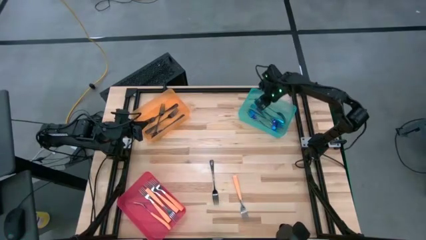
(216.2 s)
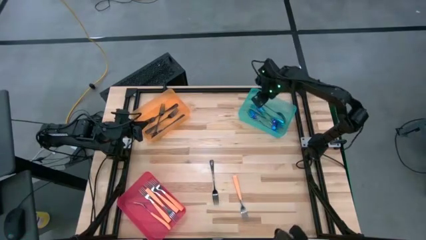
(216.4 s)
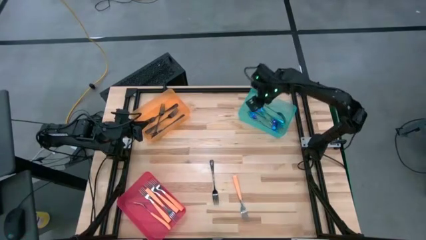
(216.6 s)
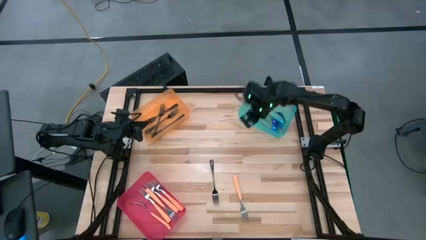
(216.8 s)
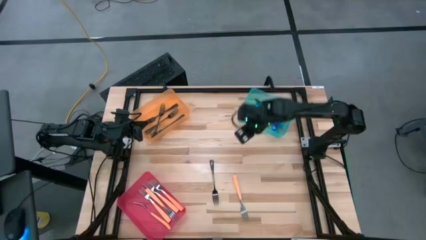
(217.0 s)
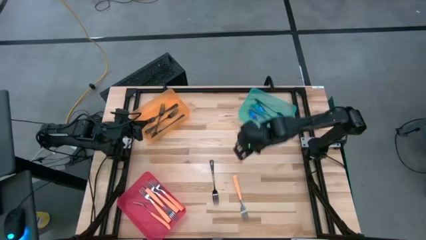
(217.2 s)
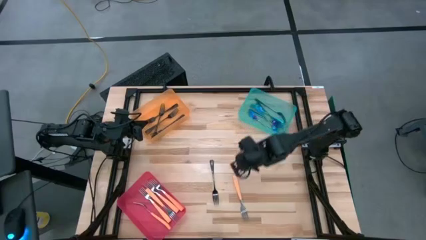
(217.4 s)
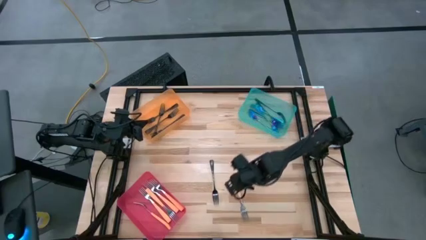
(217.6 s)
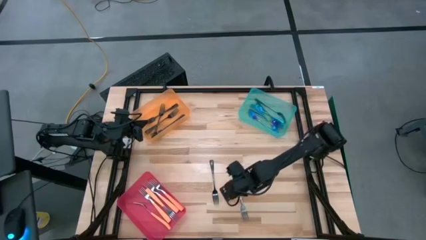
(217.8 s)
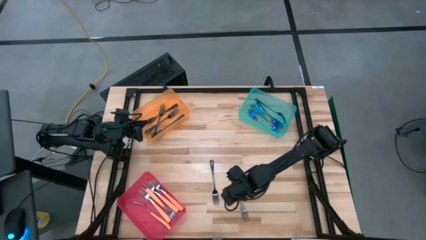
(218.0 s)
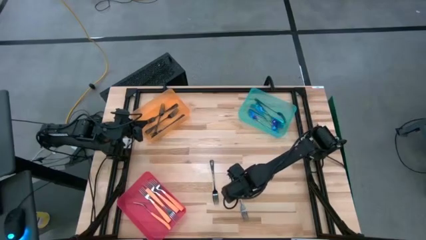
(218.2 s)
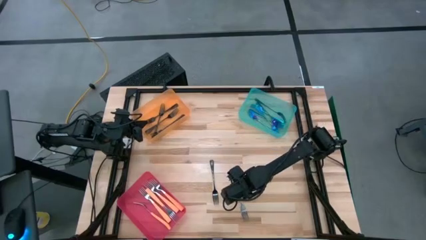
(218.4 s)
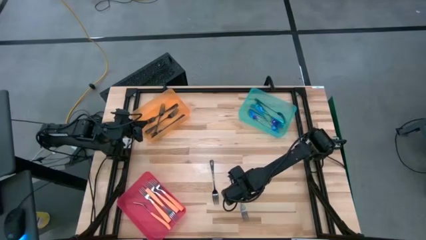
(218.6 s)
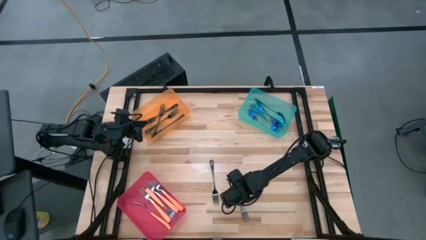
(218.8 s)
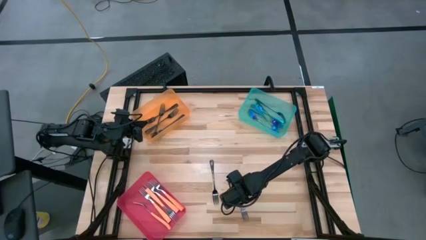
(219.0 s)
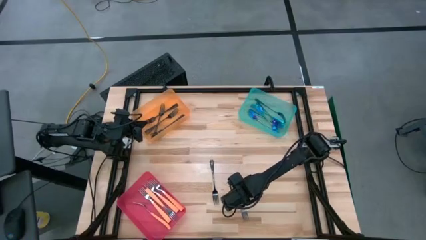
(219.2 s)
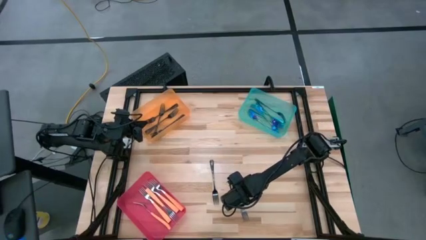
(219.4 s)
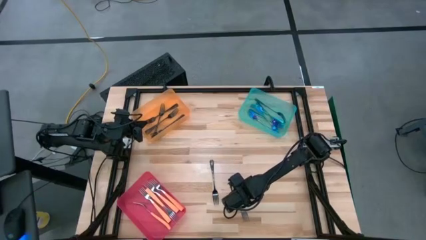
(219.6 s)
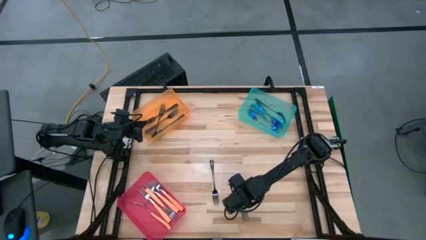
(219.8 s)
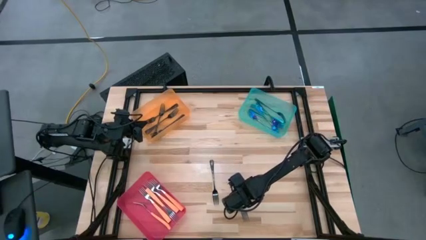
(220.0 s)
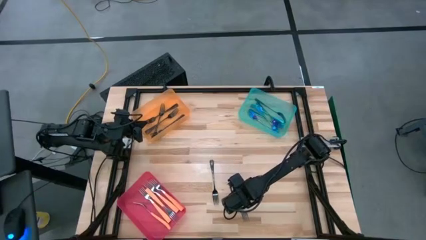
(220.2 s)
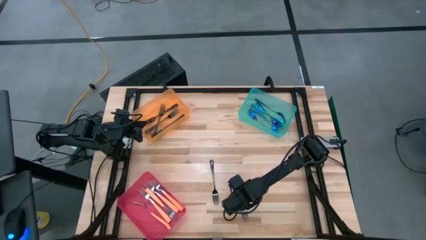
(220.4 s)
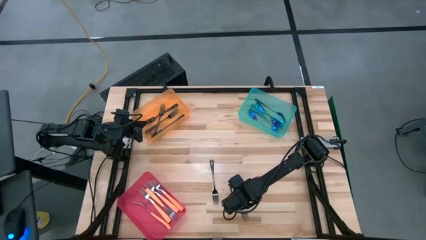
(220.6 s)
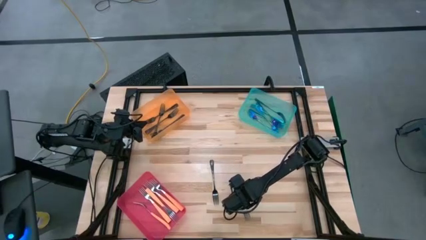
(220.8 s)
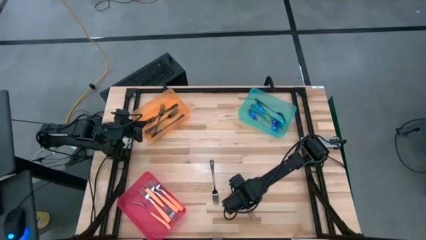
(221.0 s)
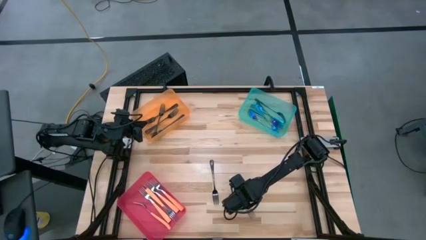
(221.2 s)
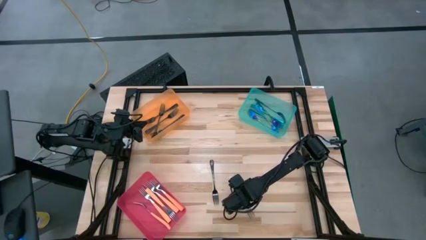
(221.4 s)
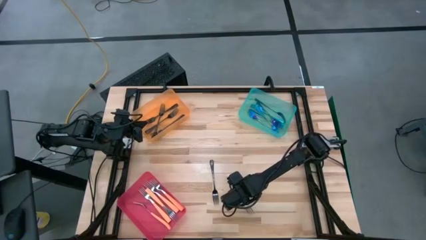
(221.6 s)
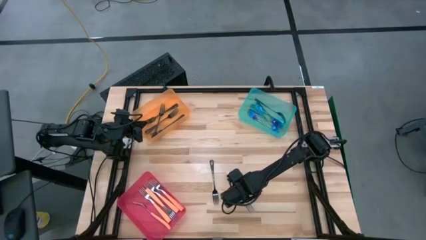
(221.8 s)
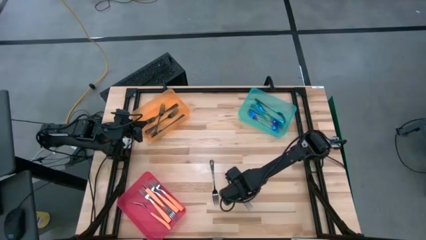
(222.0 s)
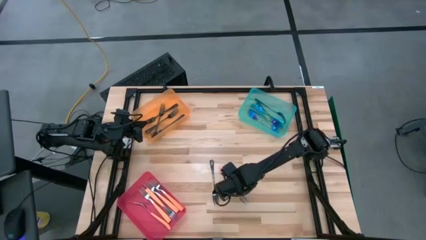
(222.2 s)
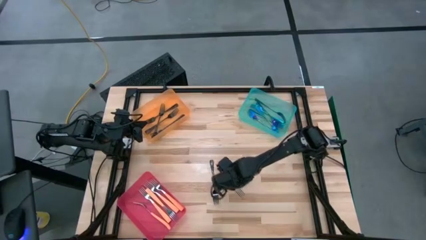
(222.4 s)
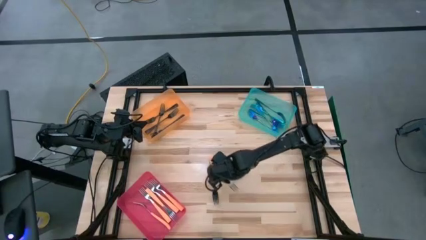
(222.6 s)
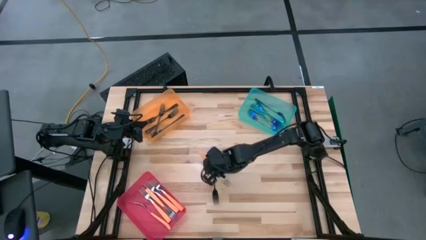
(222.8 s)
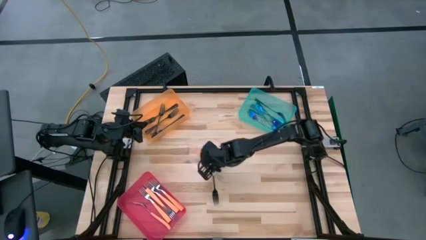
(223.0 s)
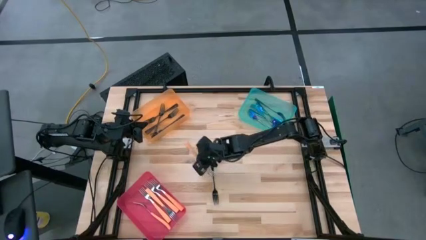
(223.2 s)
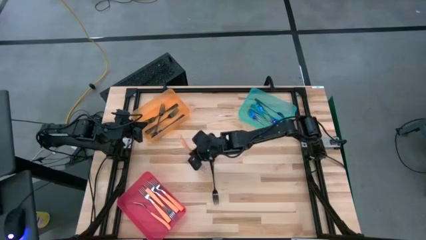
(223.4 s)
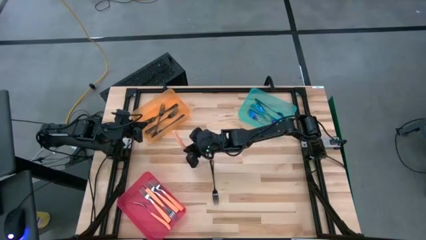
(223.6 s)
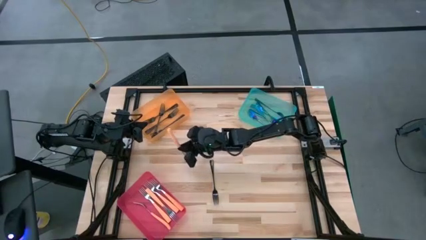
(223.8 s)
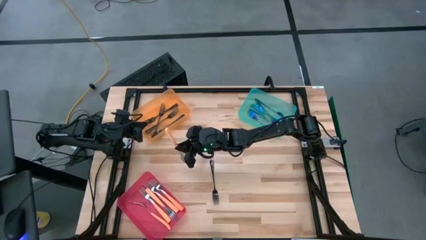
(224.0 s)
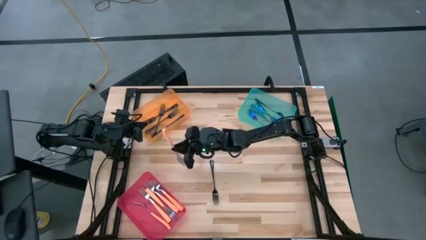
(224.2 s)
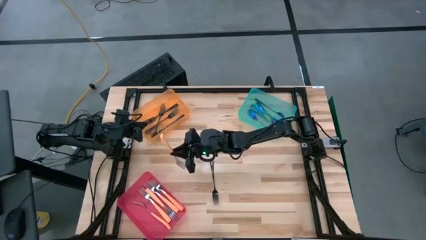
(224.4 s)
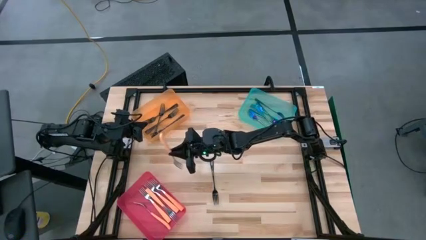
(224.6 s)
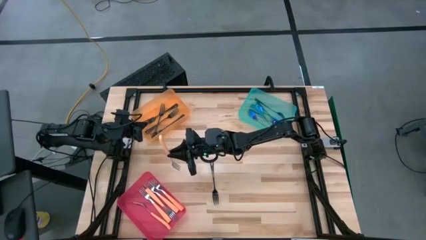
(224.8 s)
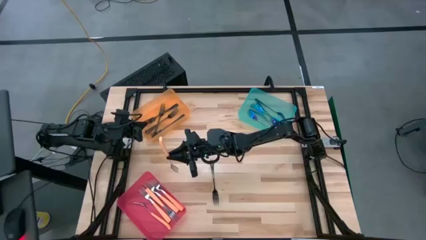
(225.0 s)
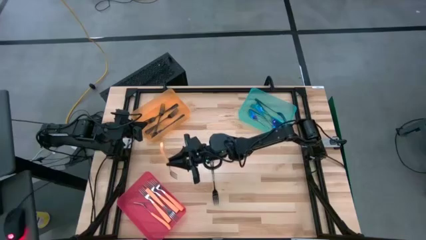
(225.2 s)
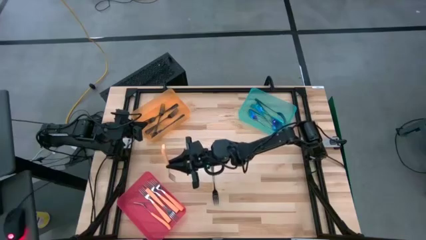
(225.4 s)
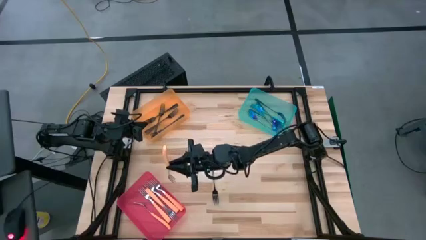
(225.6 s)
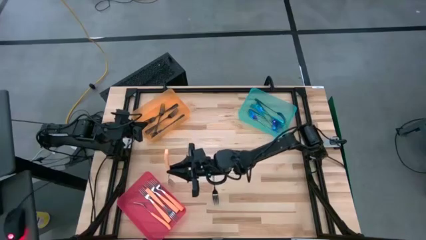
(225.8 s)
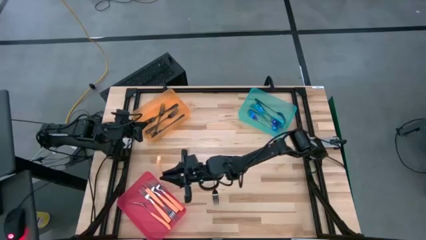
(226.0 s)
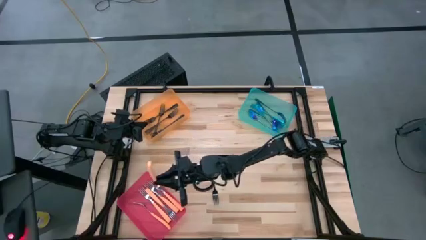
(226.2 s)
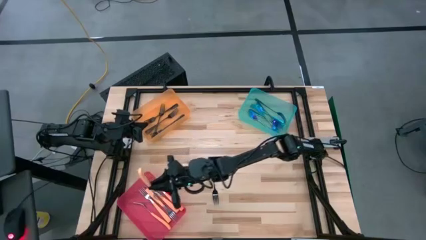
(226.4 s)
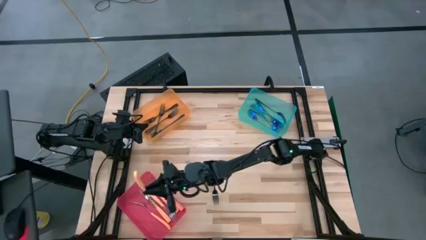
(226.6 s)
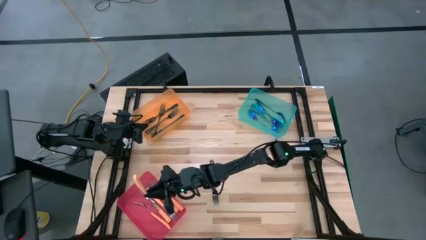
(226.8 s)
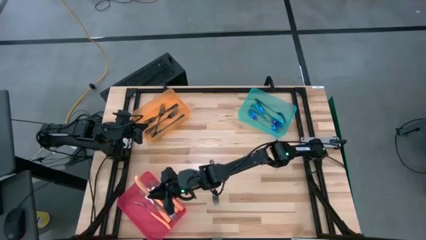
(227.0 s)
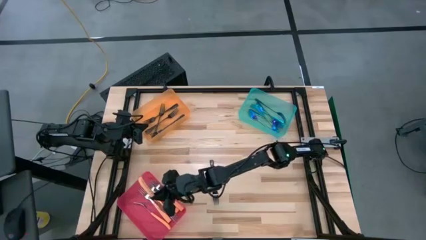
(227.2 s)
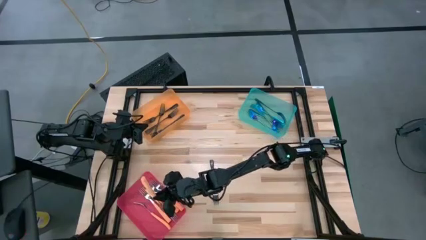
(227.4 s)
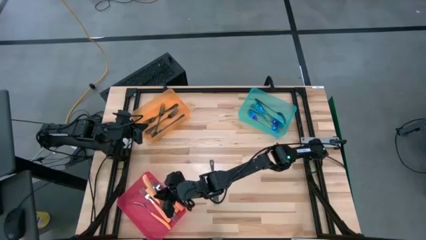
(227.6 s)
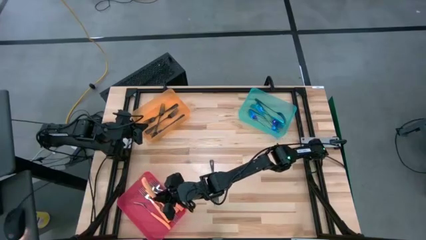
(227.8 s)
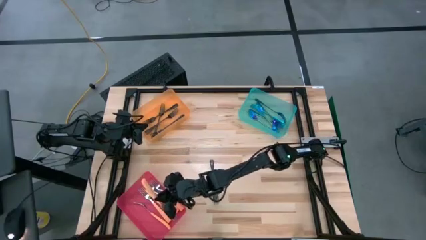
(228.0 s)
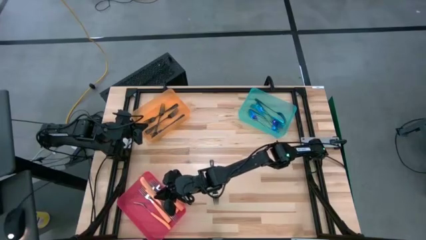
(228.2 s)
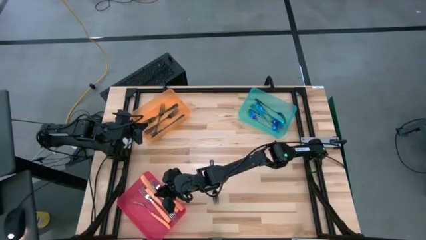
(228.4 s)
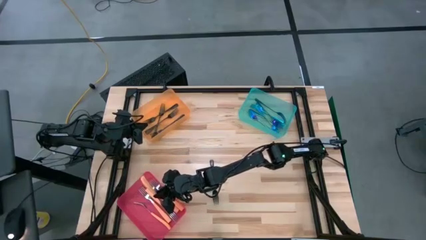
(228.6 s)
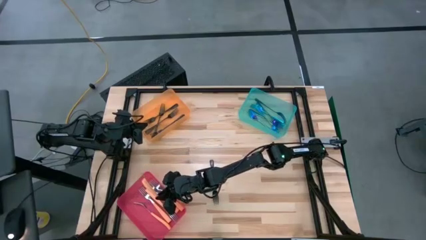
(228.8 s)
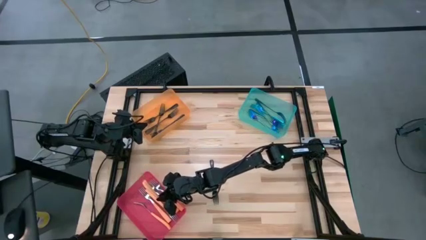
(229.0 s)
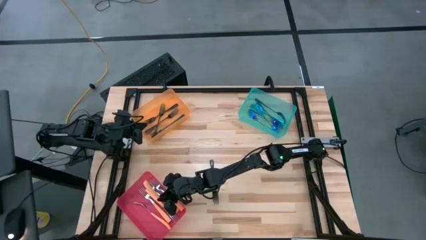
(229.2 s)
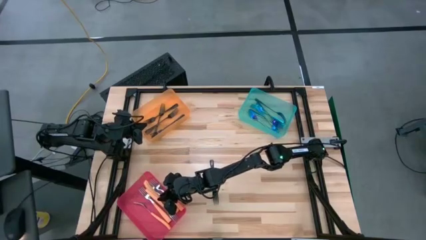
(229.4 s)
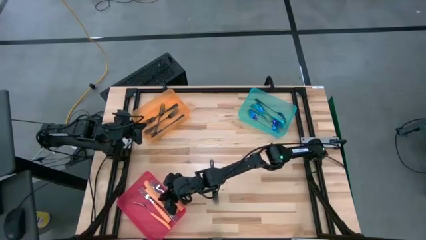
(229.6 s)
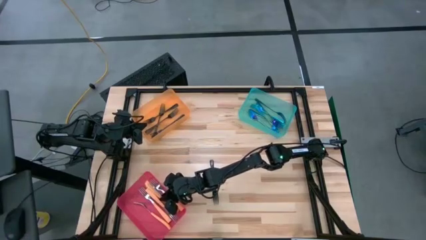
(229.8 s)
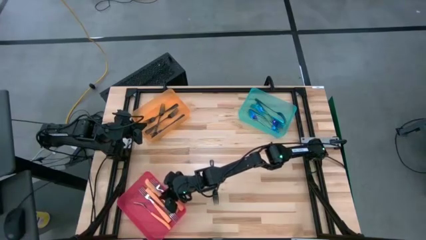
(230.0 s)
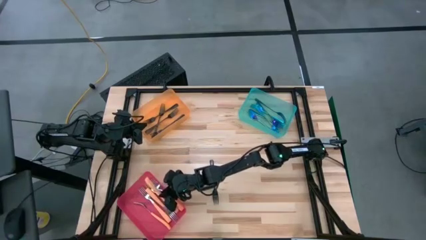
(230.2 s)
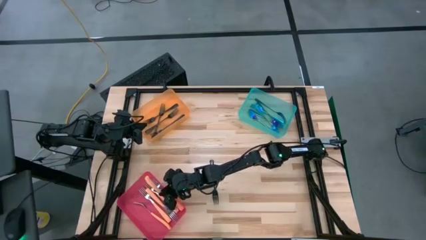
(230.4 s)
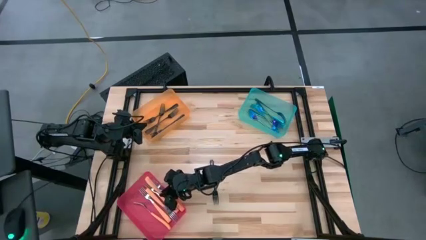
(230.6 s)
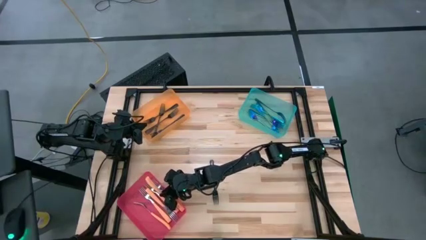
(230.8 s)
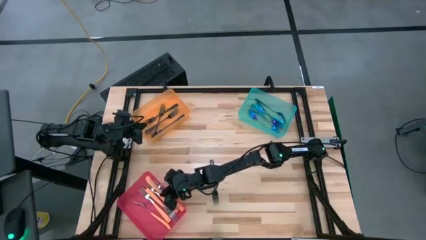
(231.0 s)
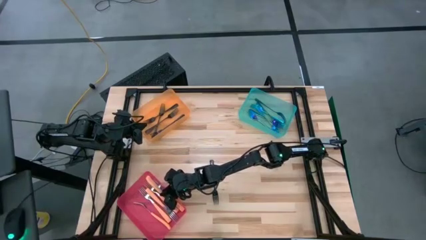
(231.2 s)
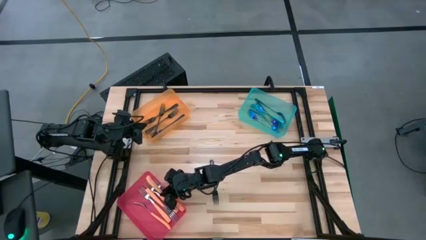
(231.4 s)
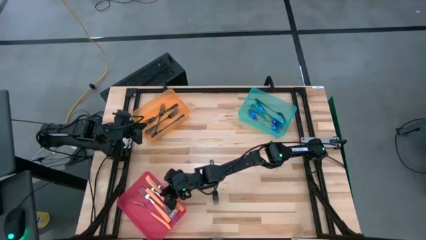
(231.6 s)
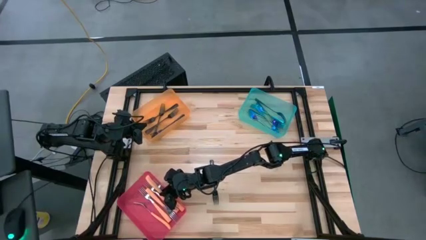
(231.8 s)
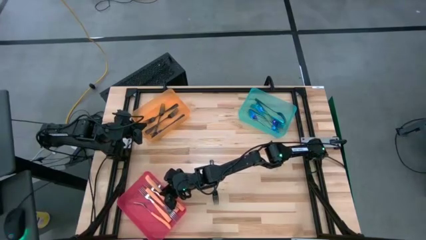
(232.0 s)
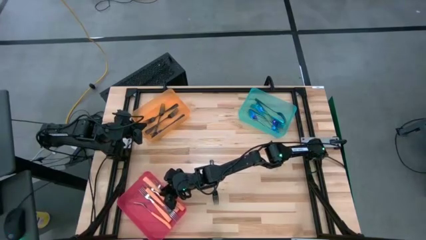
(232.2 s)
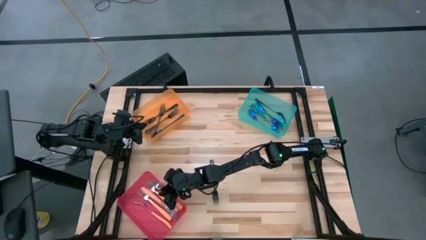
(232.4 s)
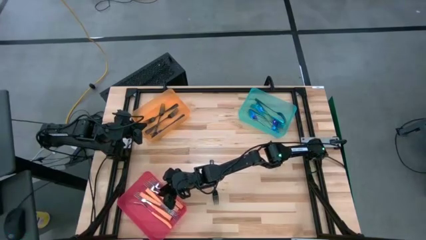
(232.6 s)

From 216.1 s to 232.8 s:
Task: Sort silverware by color (type)
Put the orange fork into the pink bin
